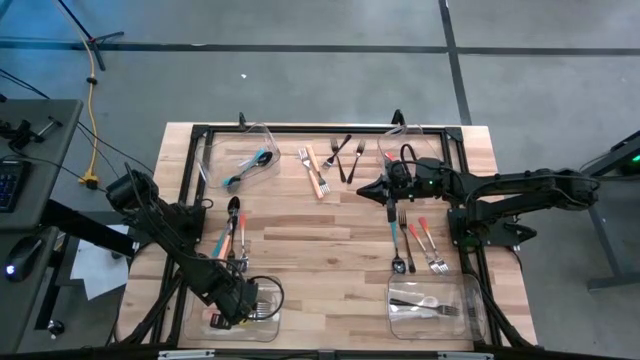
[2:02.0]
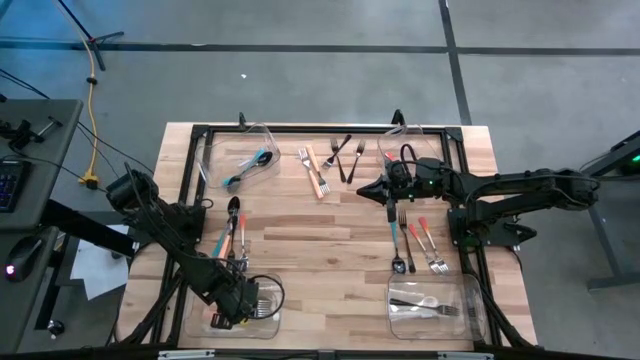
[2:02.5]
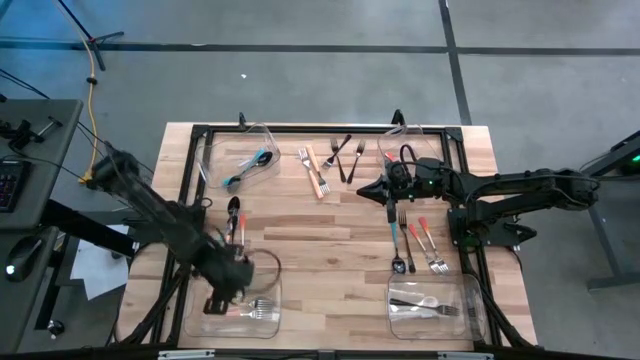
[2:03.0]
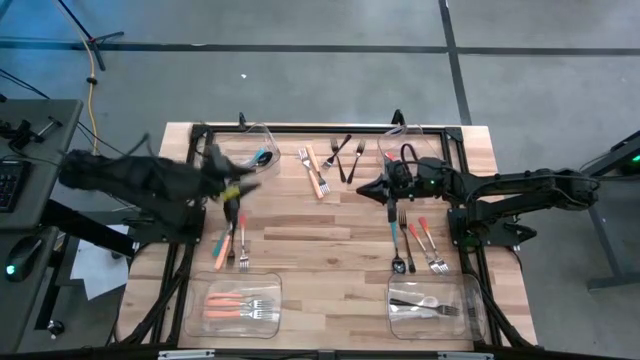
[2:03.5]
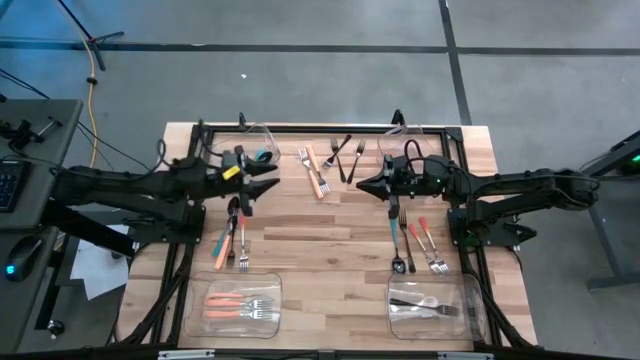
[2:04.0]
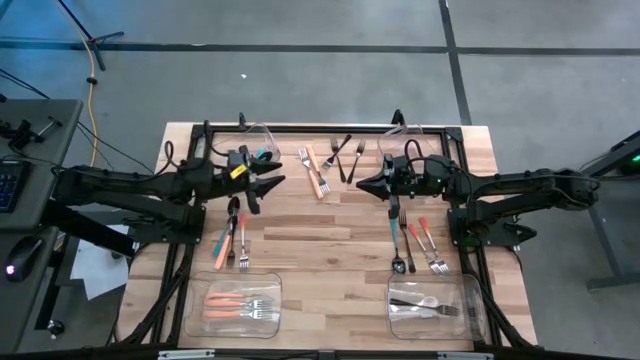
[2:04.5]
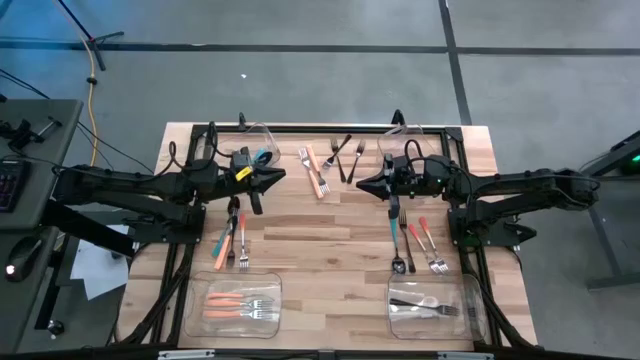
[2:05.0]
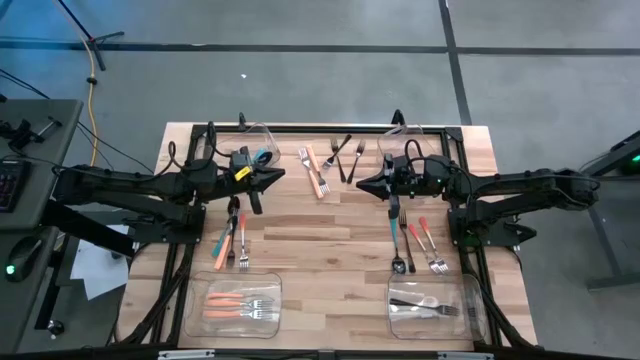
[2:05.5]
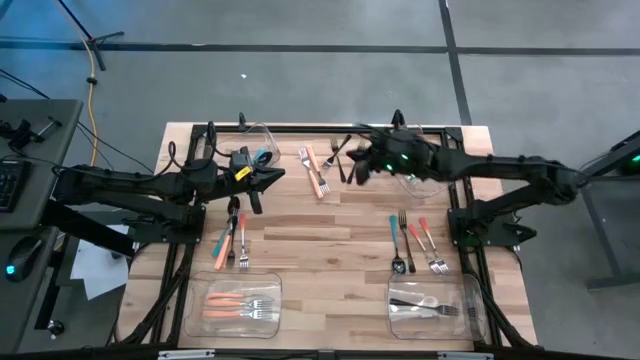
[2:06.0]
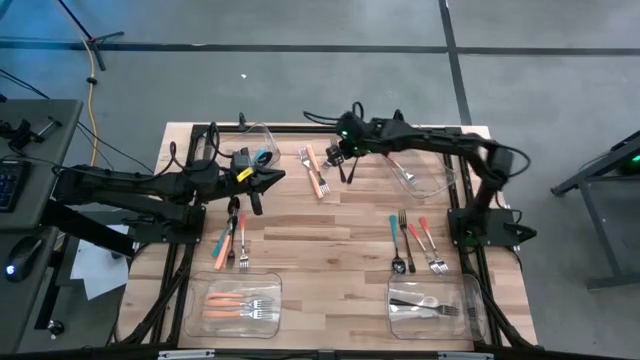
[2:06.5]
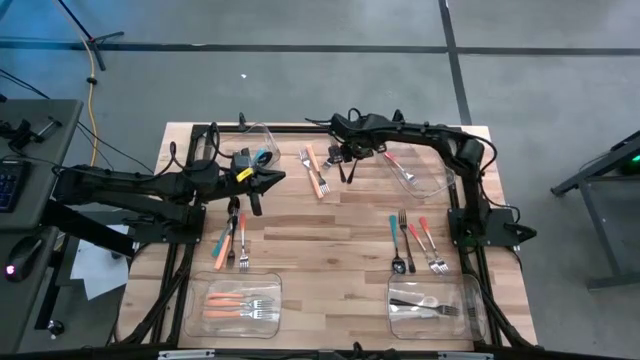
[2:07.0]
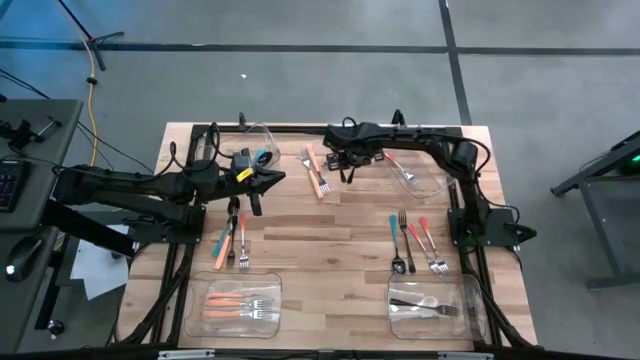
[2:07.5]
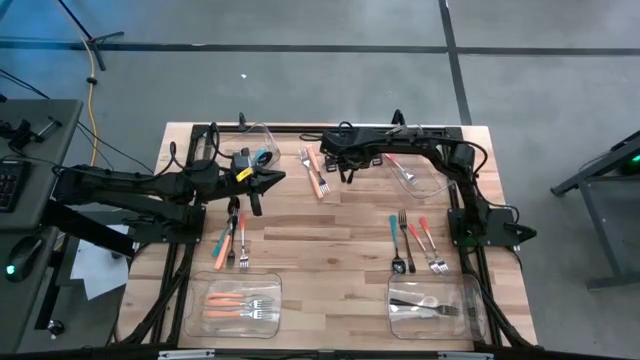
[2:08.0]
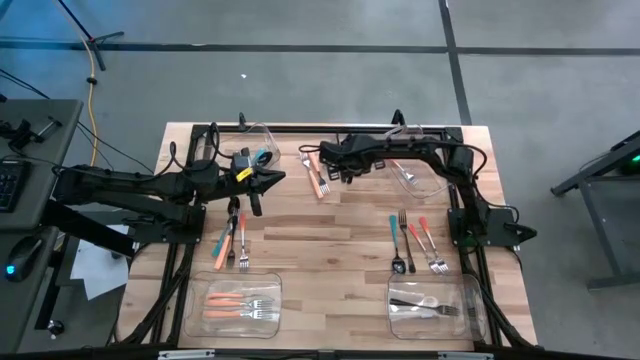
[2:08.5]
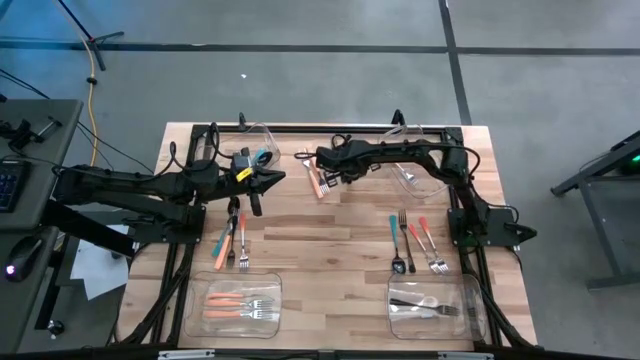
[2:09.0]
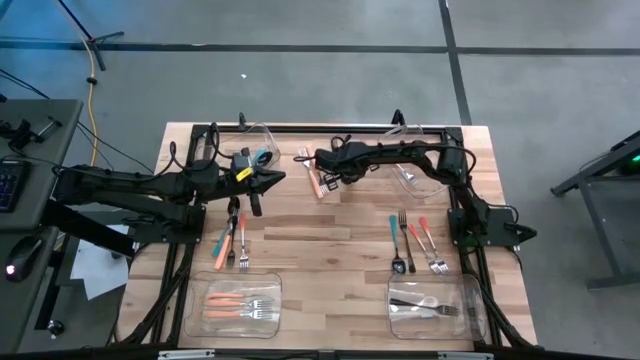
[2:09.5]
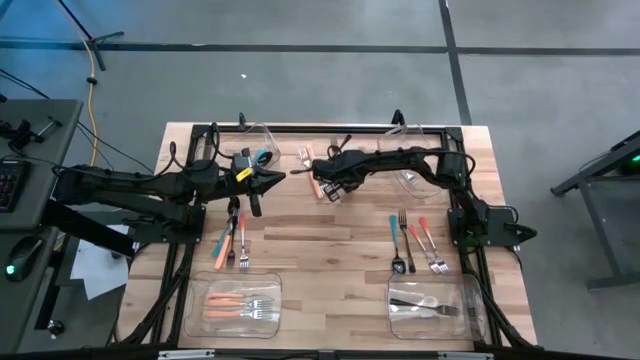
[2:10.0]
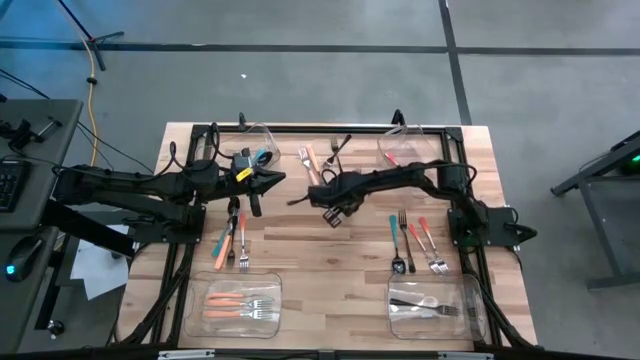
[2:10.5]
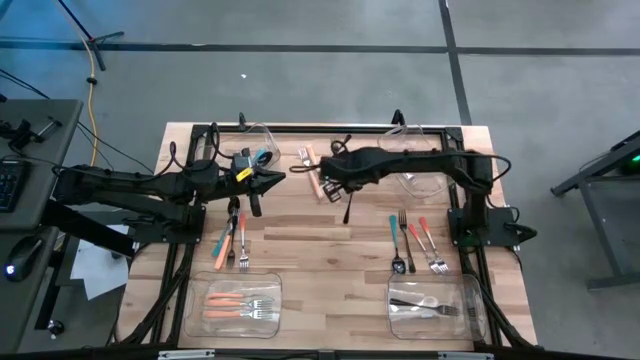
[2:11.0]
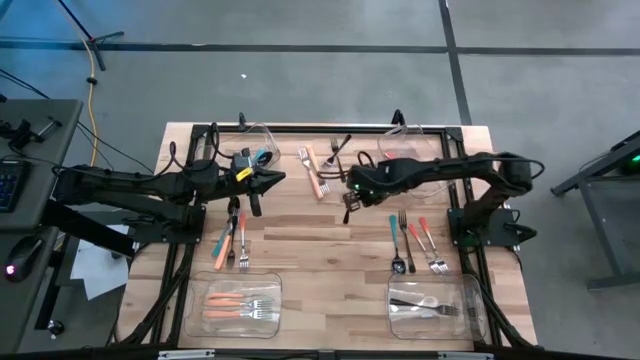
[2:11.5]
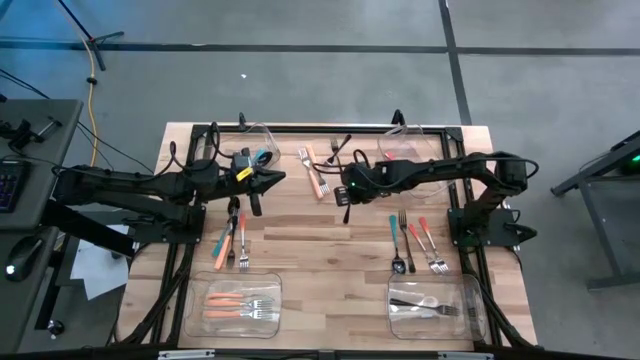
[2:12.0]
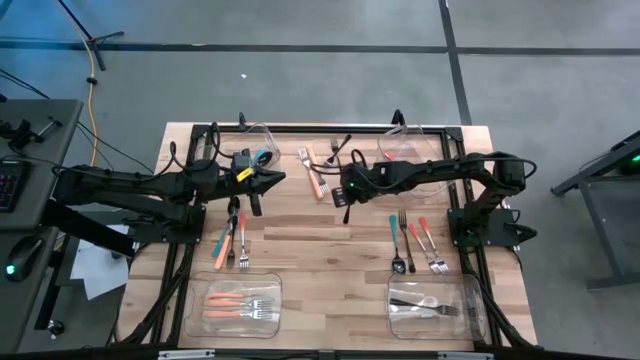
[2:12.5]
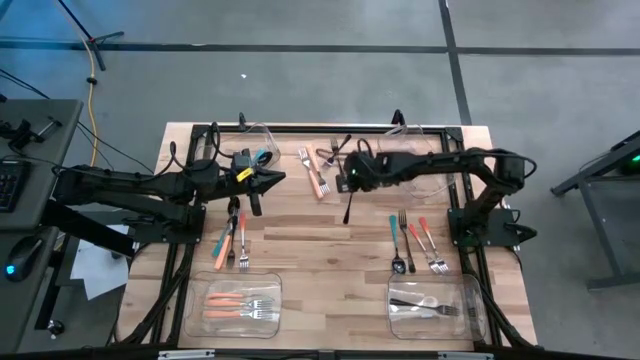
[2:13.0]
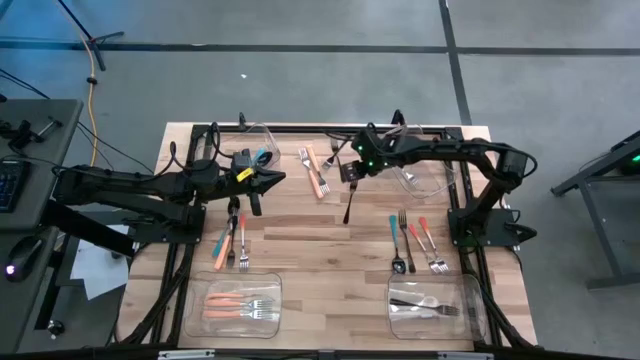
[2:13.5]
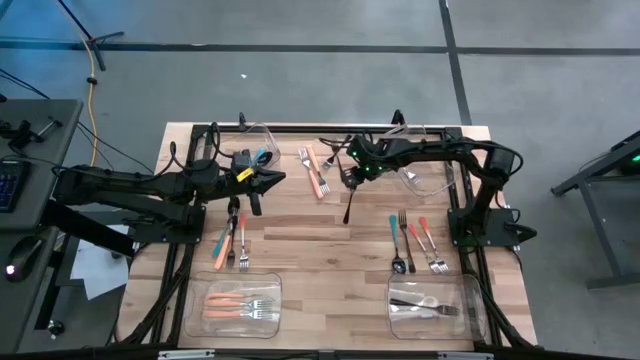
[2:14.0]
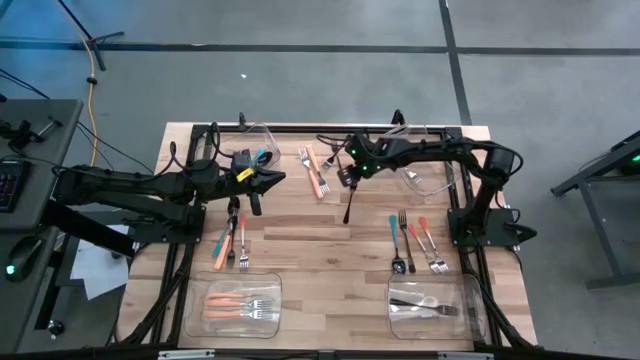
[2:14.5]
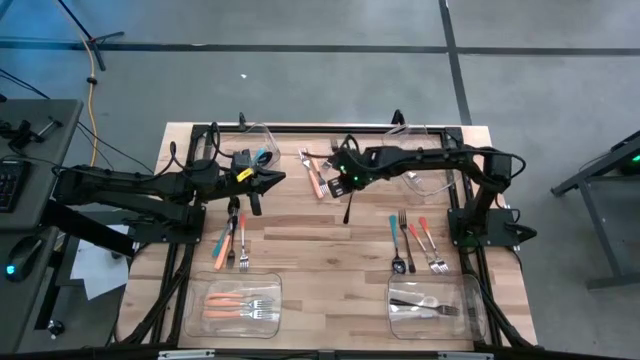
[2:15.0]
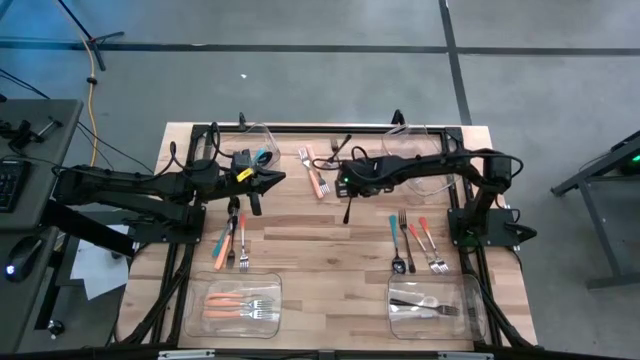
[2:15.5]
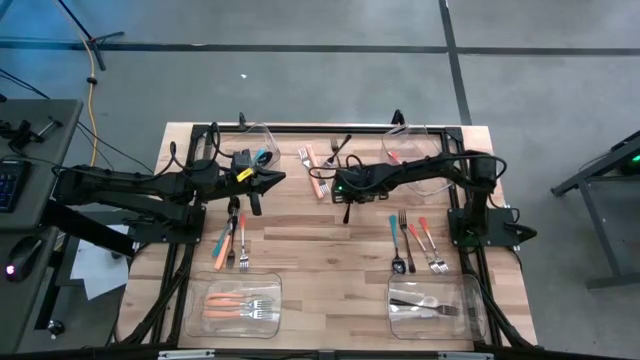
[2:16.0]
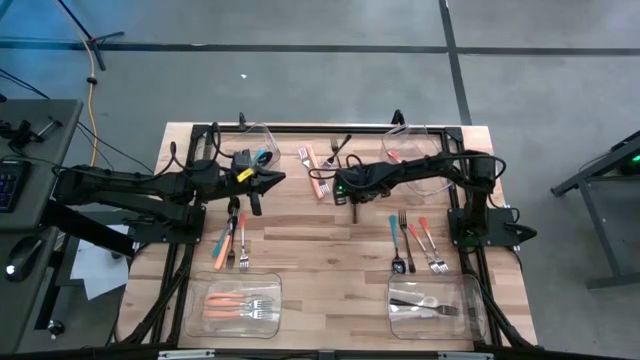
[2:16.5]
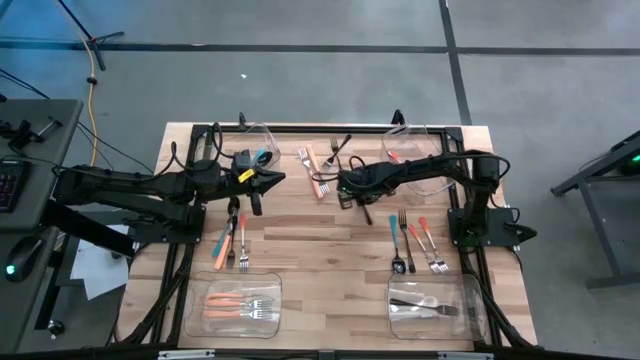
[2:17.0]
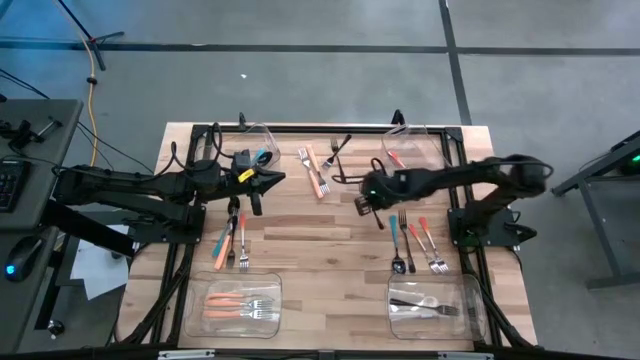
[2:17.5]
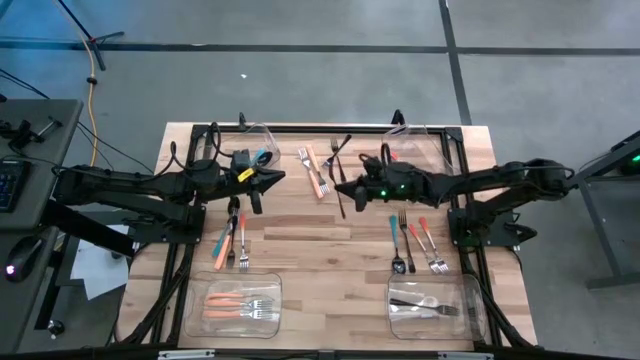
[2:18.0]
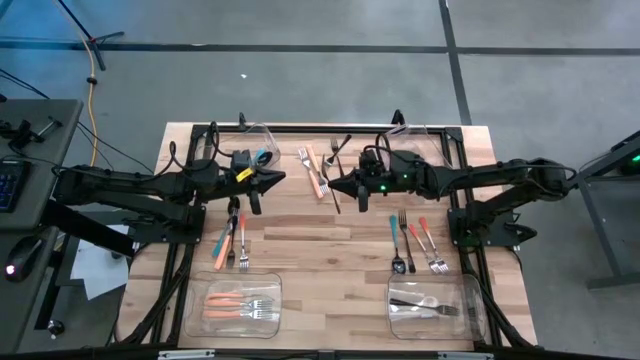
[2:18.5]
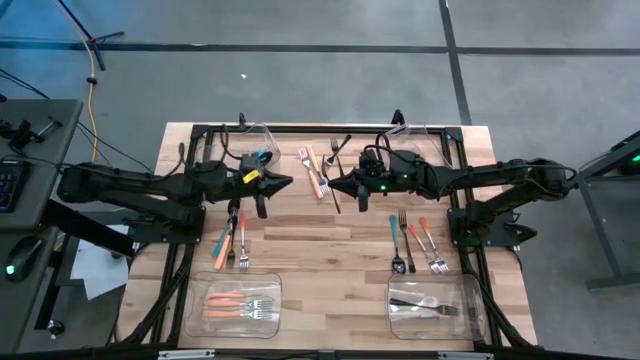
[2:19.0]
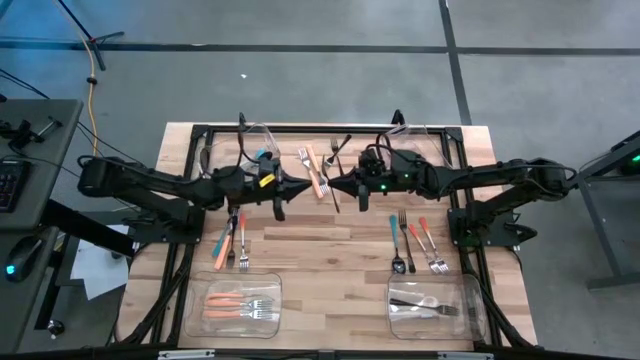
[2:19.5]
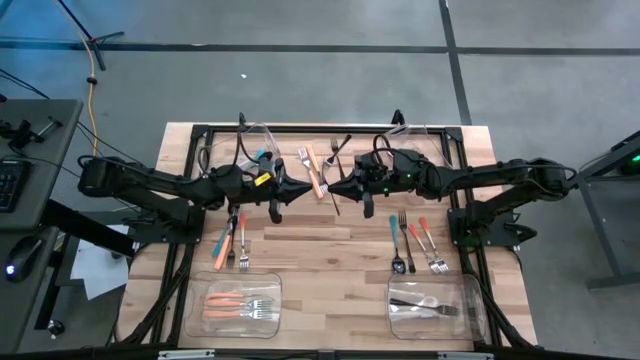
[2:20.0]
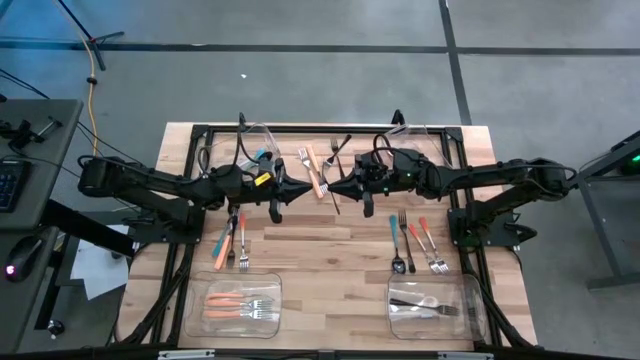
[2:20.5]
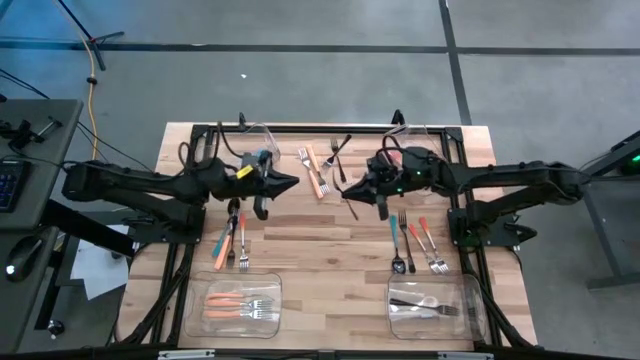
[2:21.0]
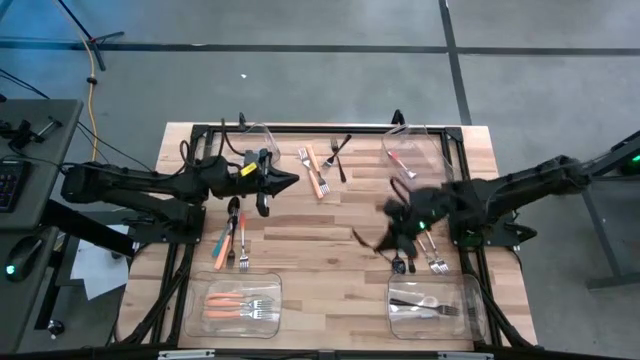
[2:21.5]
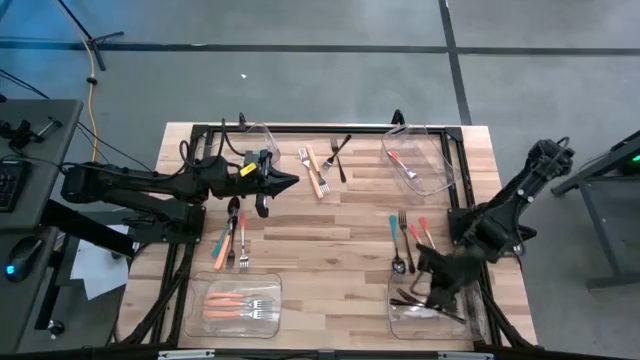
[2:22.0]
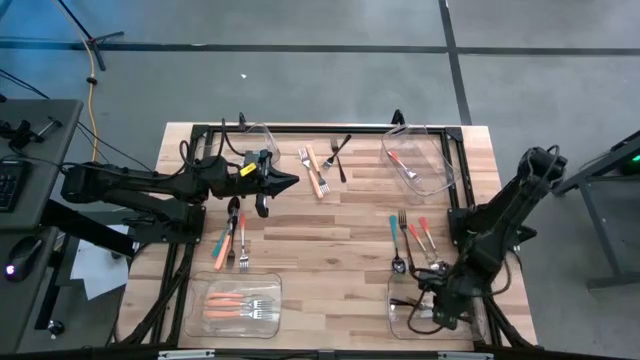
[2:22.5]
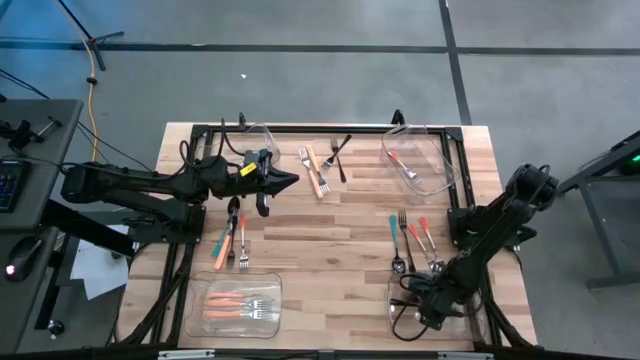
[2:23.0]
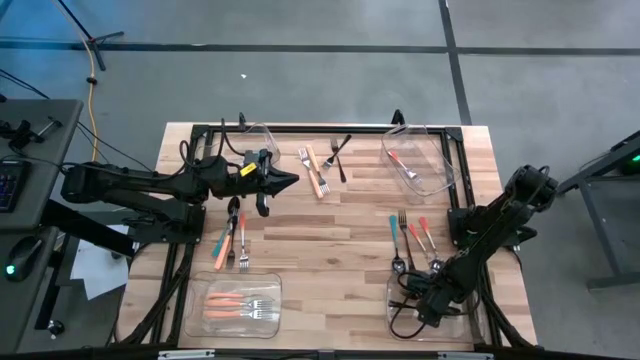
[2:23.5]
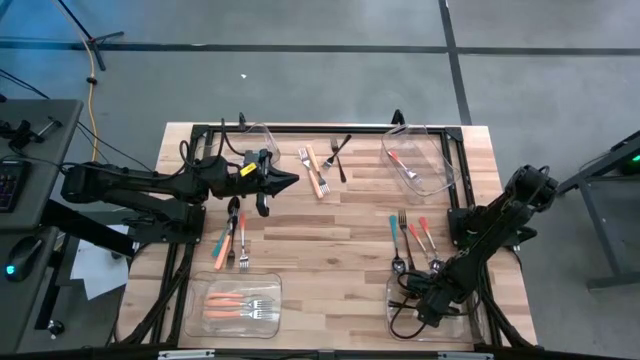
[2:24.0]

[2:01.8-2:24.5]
Task: Sort silverware by color (type)
Put the black fork into the bottom right transparent bin
